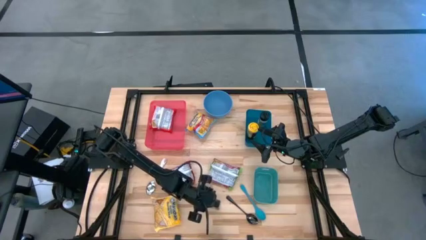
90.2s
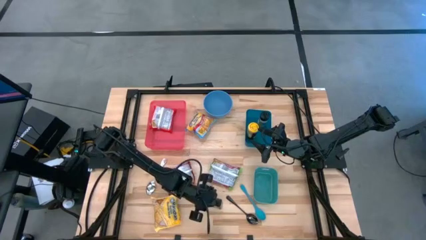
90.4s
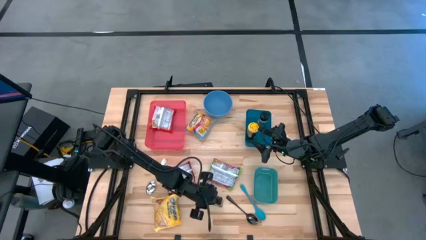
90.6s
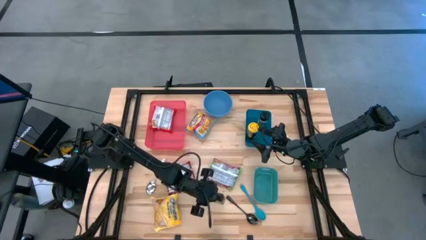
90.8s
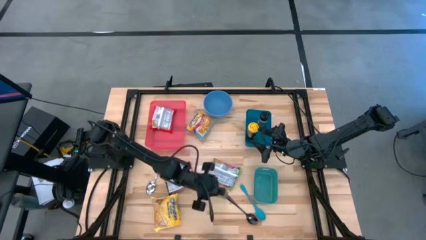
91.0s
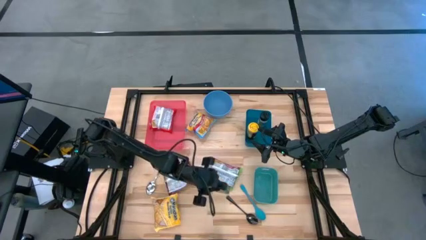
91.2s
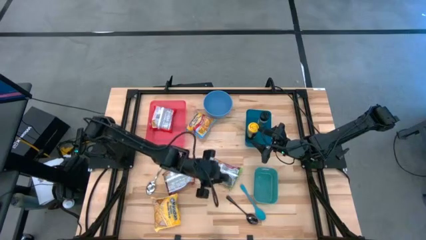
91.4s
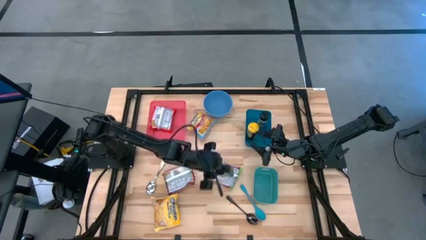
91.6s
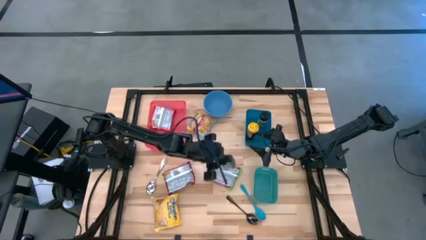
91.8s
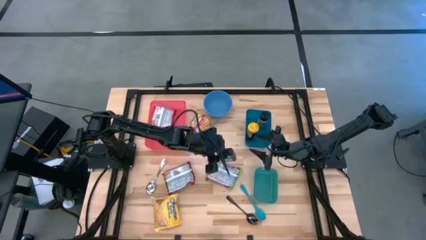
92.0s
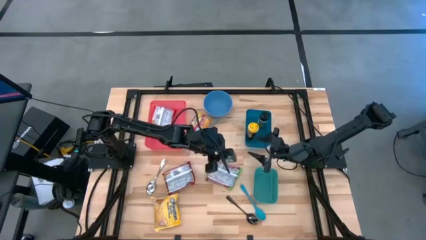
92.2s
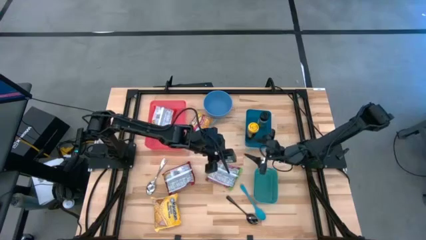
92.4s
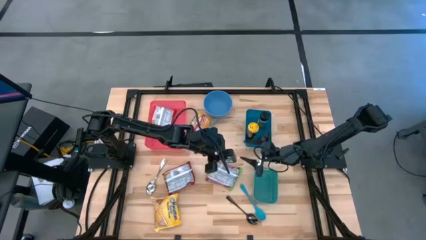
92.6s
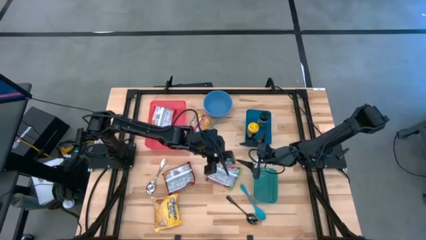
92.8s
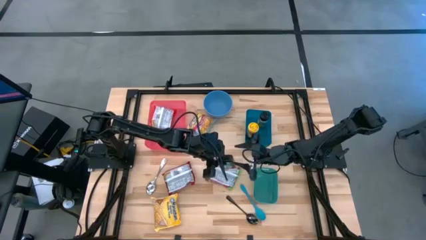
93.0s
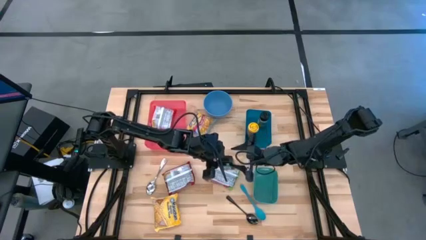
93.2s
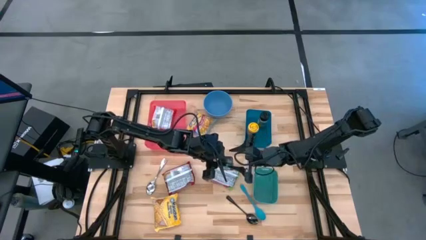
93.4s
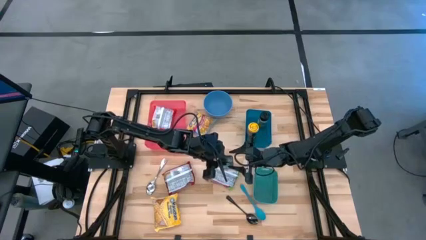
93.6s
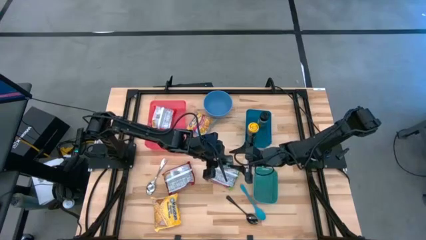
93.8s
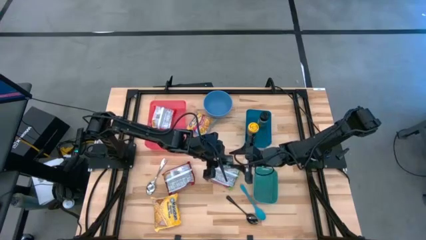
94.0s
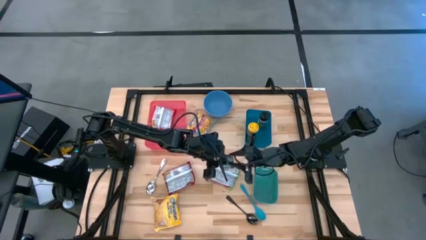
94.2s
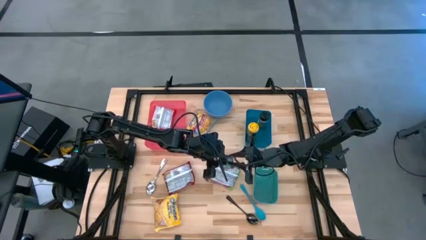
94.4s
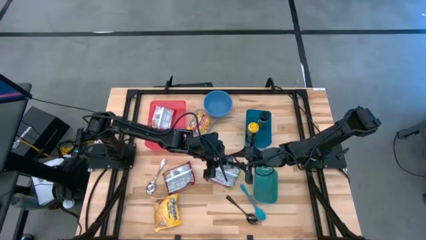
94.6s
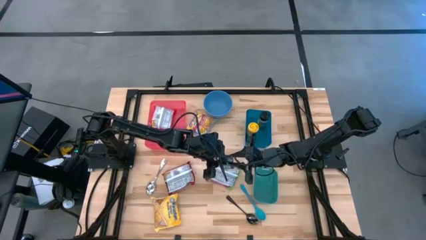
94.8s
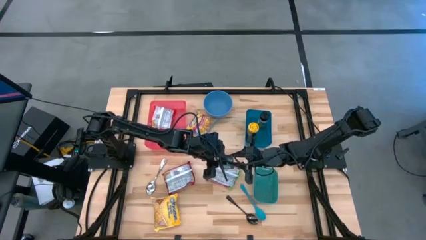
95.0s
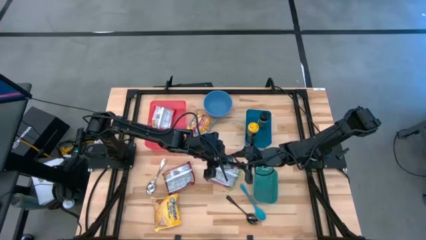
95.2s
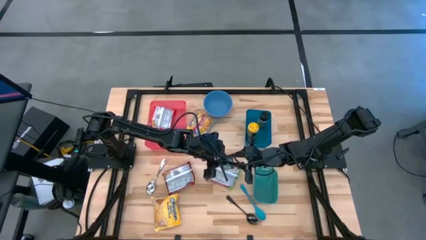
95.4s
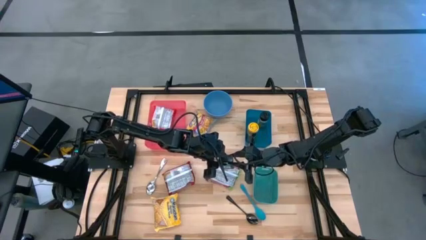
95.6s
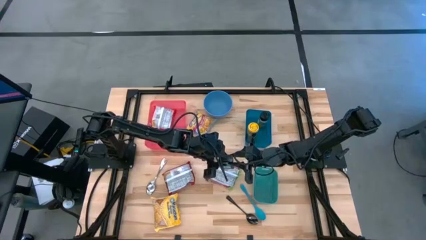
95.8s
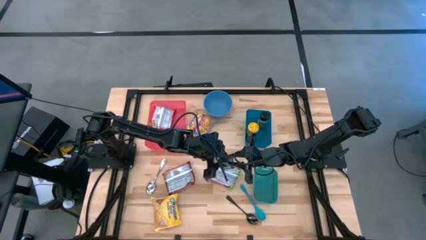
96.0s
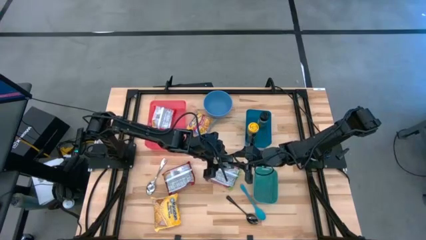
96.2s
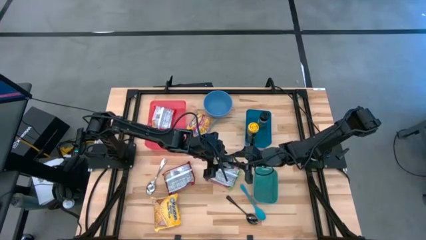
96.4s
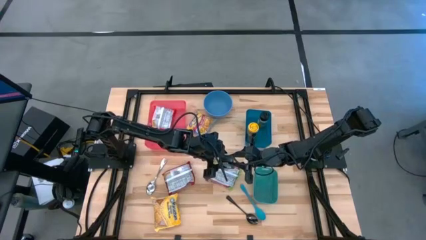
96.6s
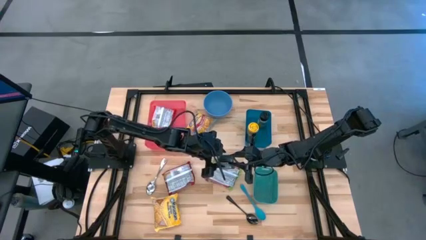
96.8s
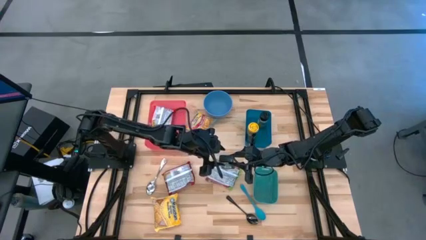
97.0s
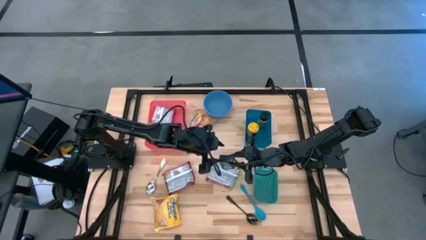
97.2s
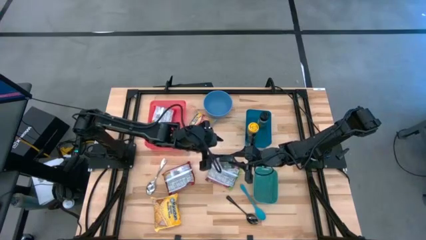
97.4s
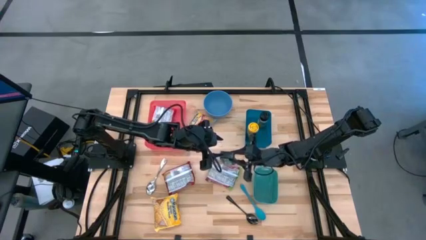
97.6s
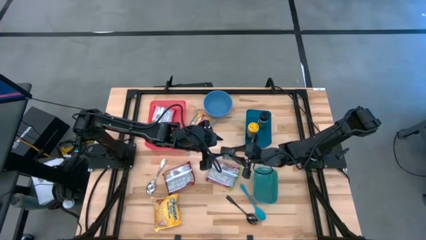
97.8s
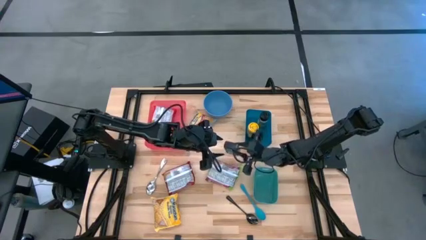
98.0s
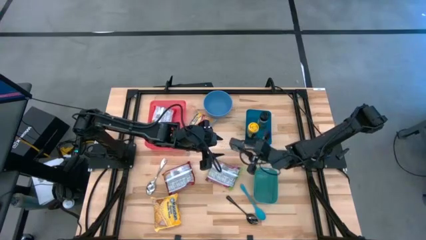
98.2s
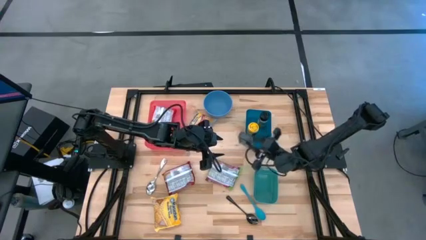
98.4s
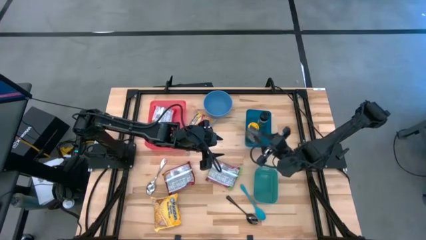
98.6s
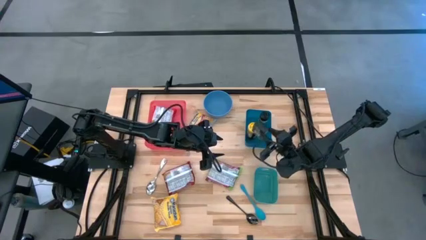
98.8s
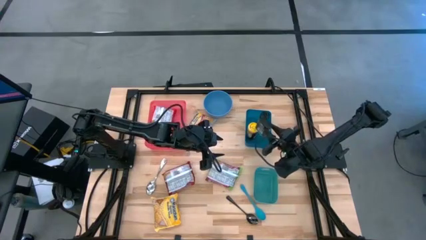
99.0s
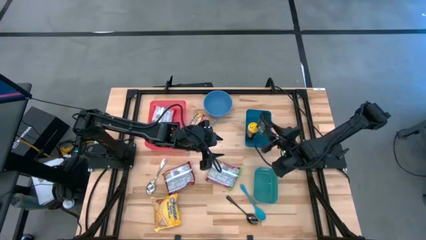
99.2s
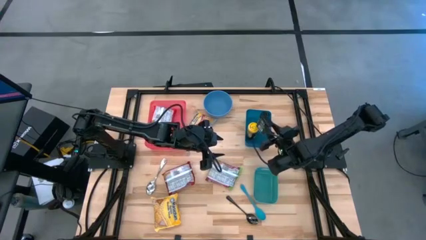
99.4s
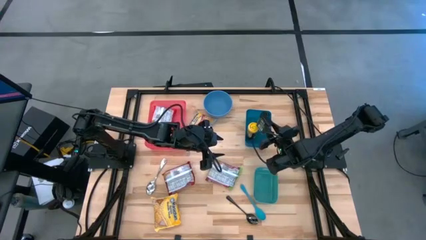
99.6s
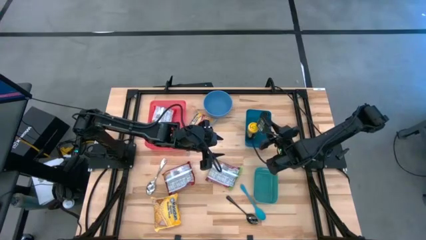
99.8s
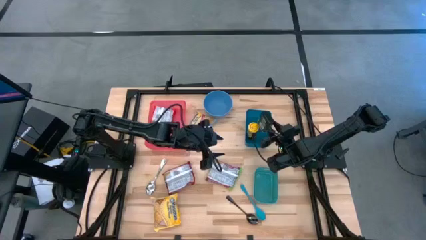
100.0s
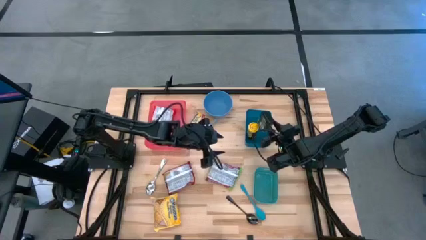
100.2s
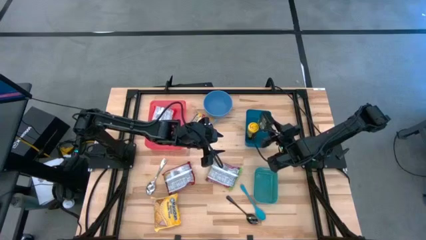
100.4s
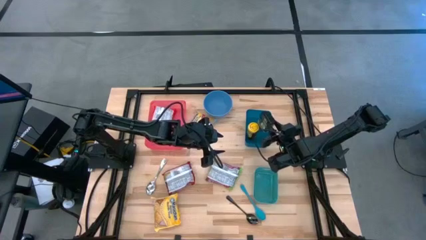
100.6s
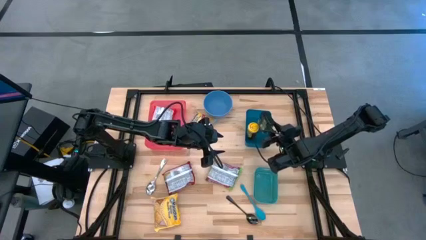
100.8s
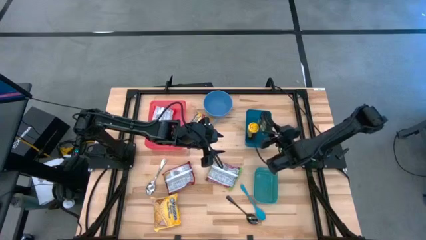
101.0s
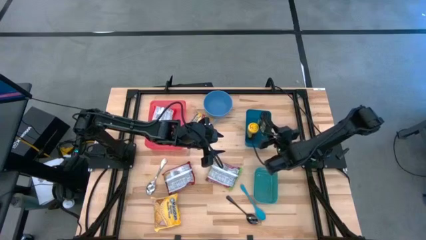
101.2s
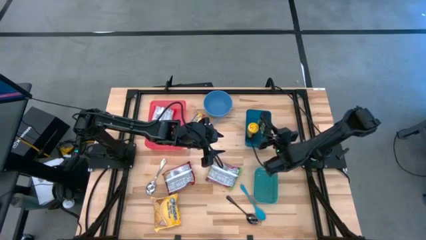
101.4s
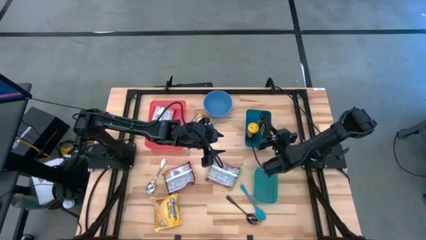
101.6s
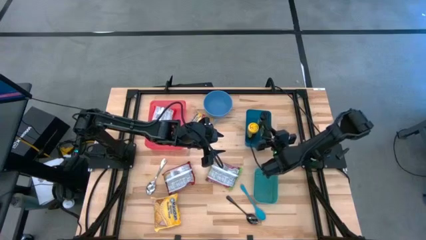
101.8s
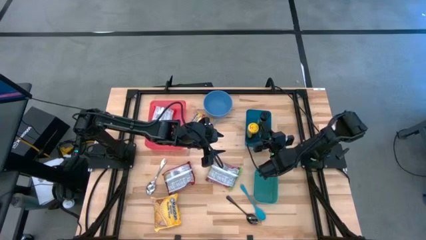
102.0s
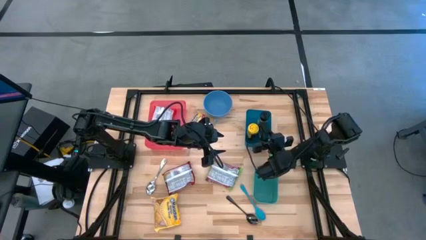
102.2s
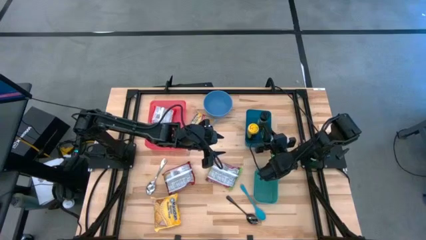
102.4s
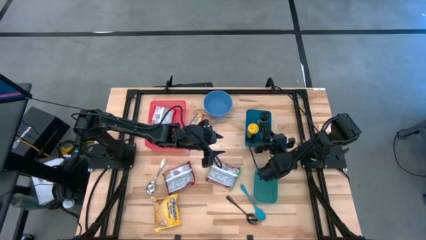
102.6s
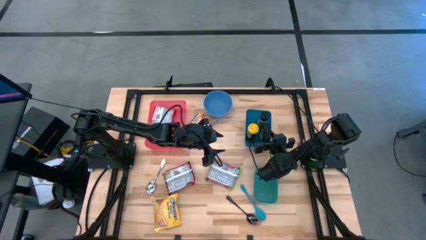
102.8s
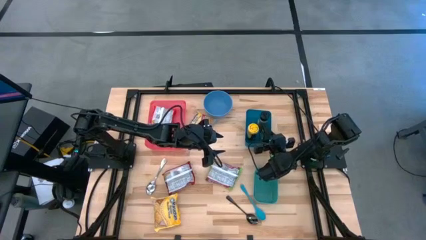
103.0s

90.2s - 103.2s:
Task: Pick & Place Food Item
Put the black seasoning can into the blue bin

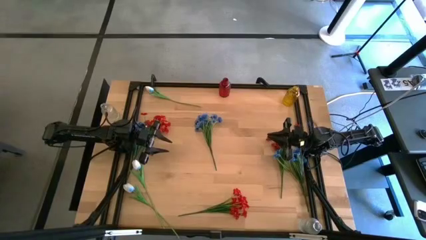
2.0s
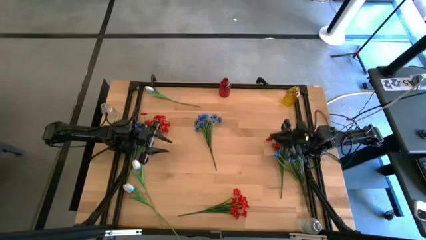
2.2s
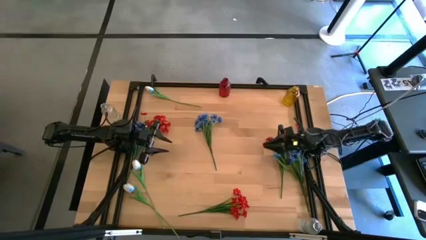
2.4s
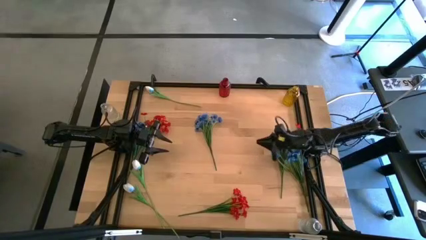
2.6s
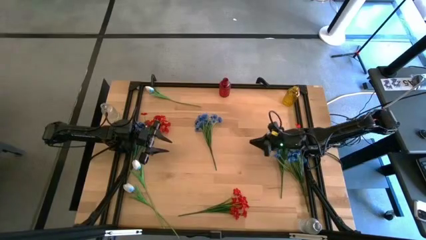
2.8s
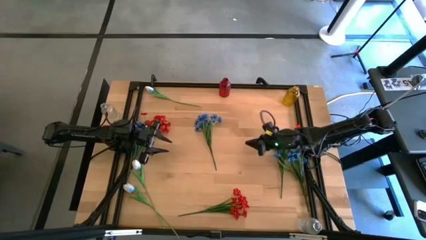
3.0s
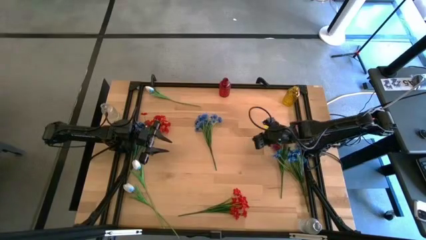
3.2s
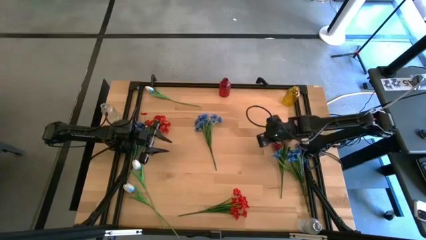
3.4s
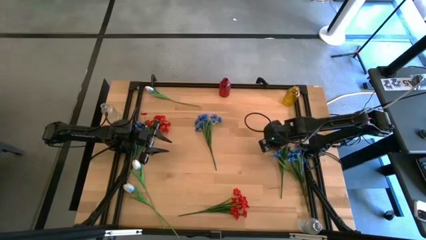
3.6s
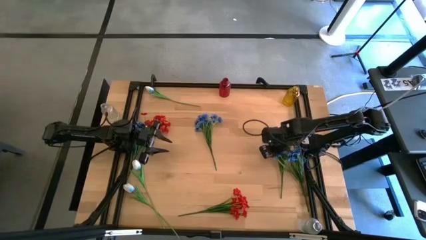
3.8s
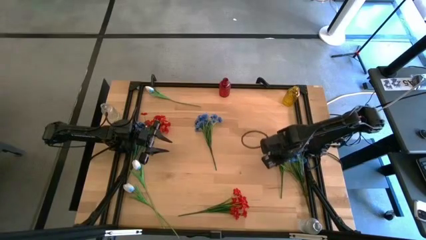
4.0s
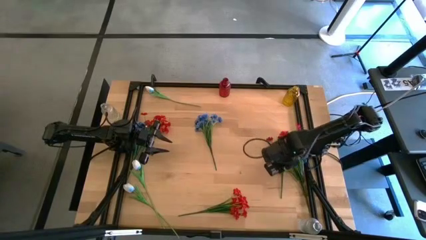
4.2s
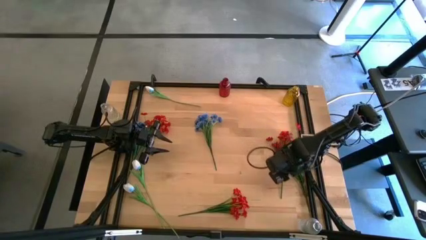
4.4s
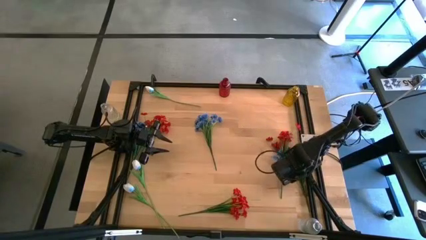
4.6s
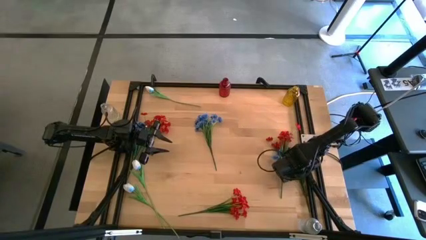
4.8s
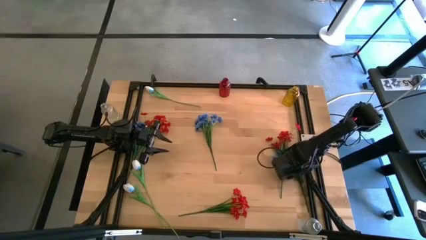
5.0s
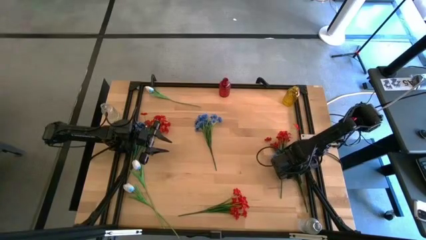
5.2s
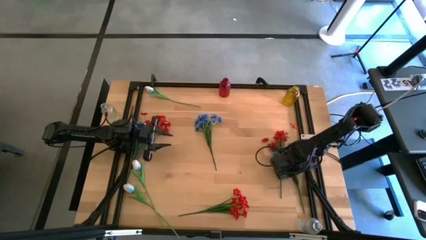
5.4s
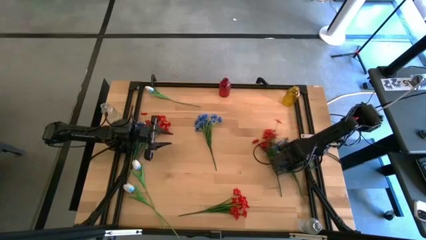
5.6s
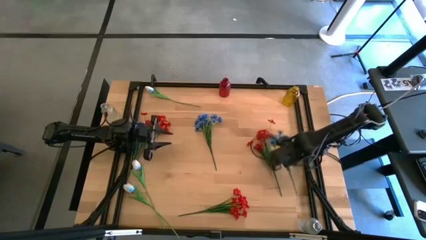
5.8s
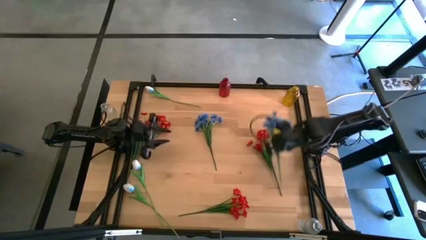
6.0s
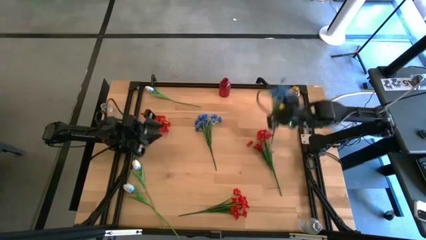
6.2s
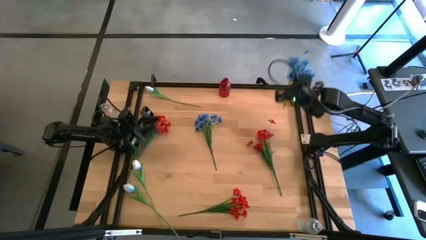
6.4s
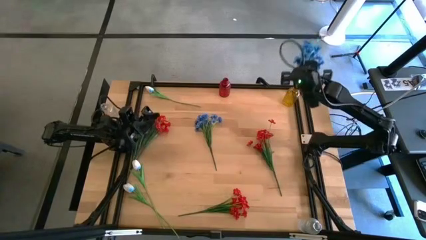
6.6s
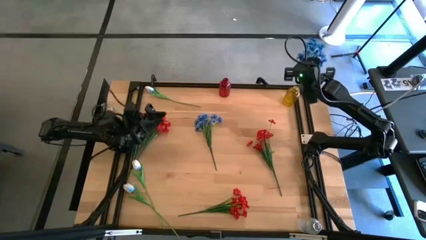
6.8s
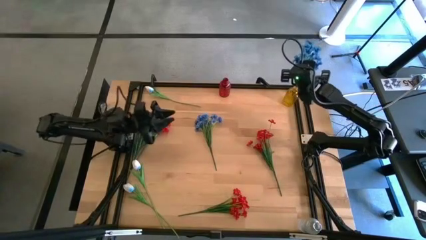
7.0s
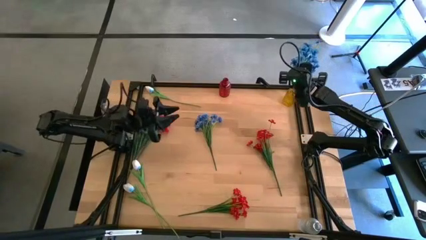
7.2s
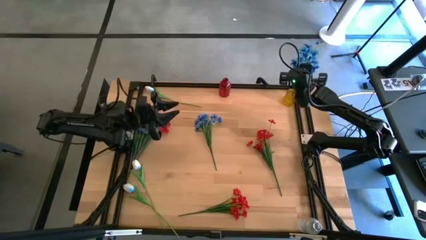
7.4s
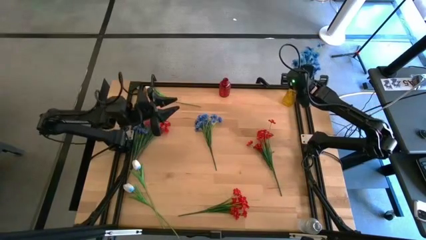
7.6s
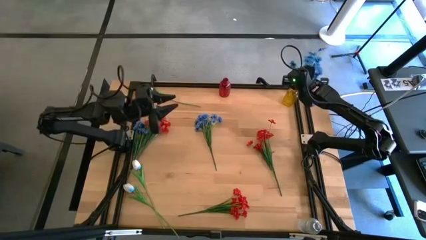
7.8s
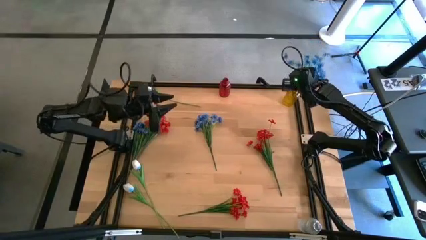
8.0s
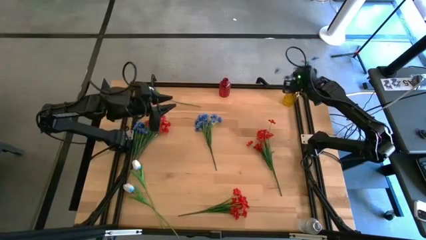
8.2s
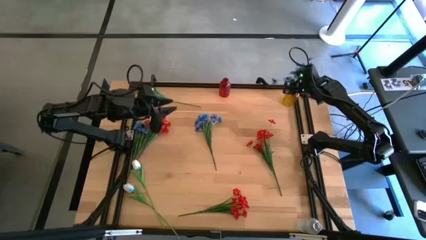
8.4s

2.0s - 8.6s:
Task: Sort flowers into vase by color
Put the right blue flowers into the yellow vase
